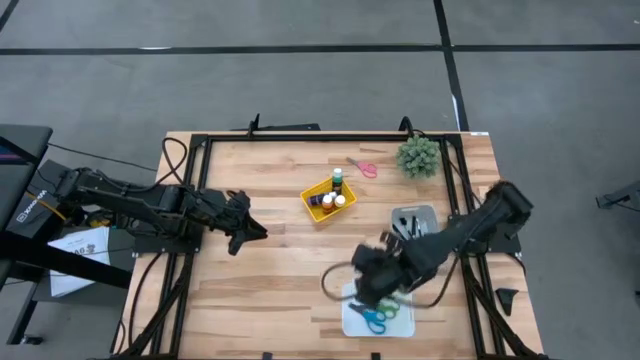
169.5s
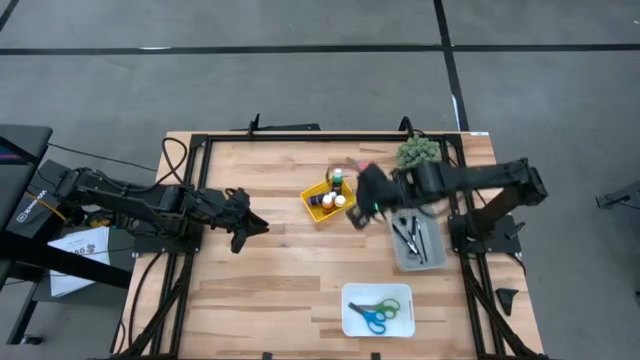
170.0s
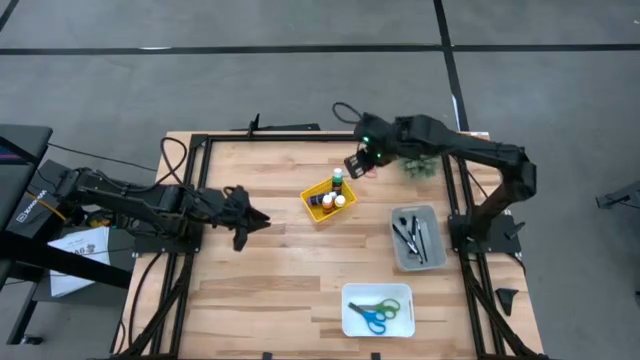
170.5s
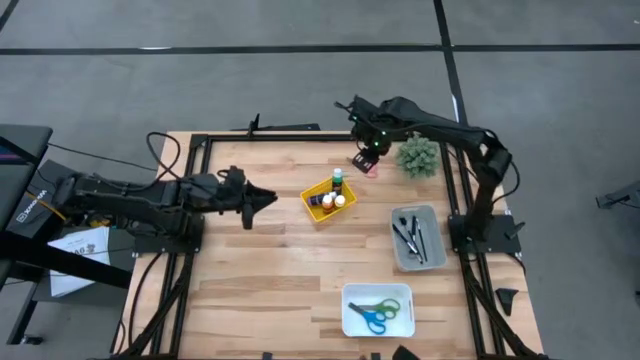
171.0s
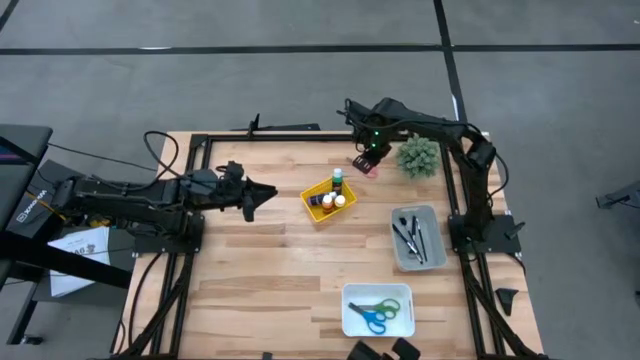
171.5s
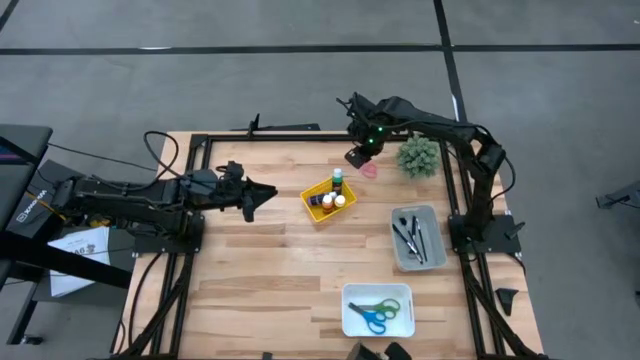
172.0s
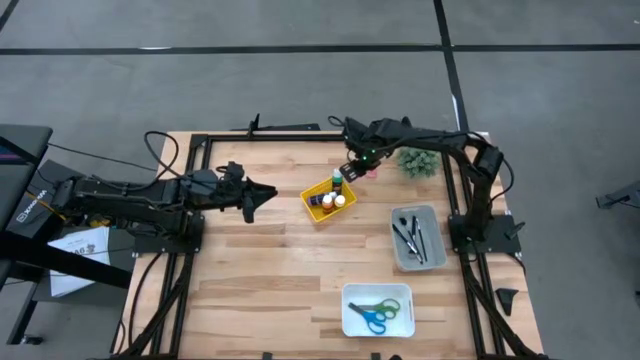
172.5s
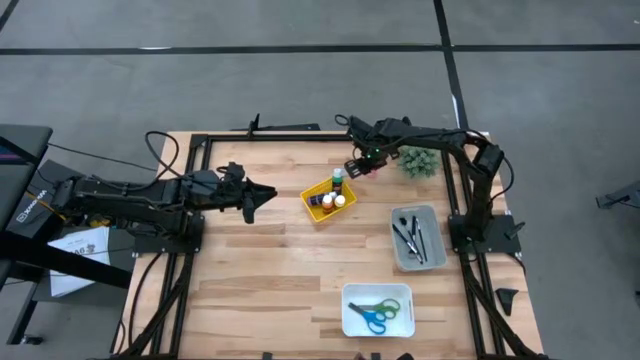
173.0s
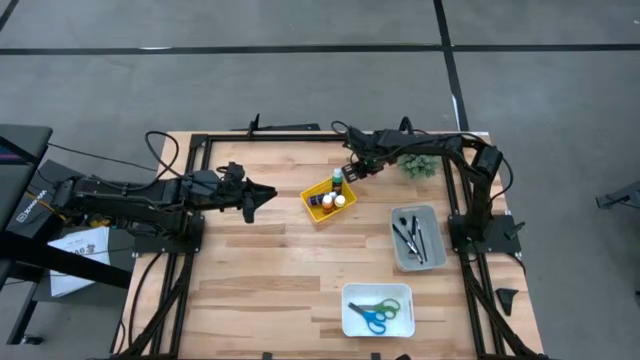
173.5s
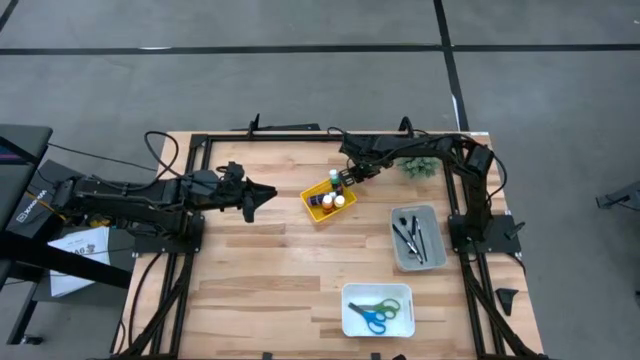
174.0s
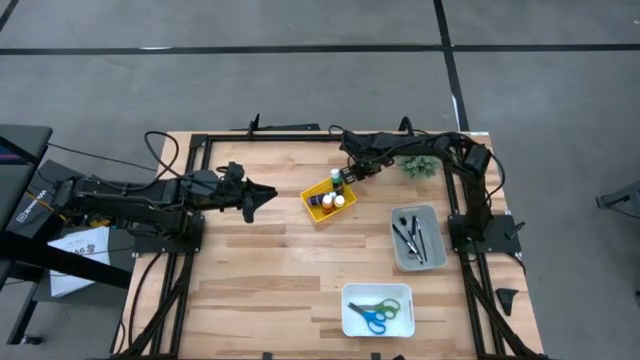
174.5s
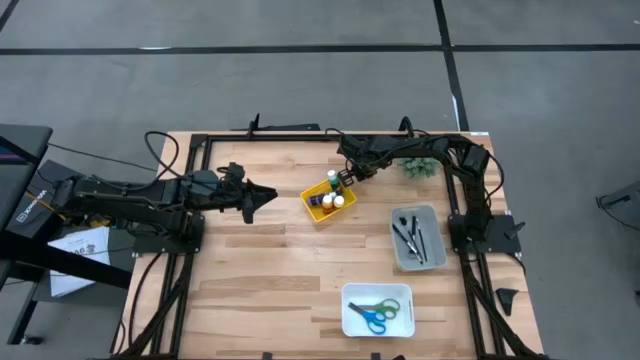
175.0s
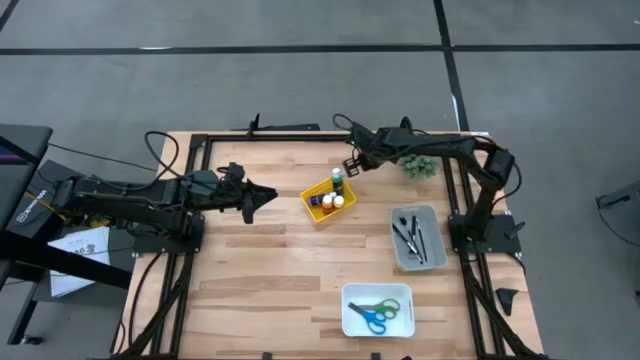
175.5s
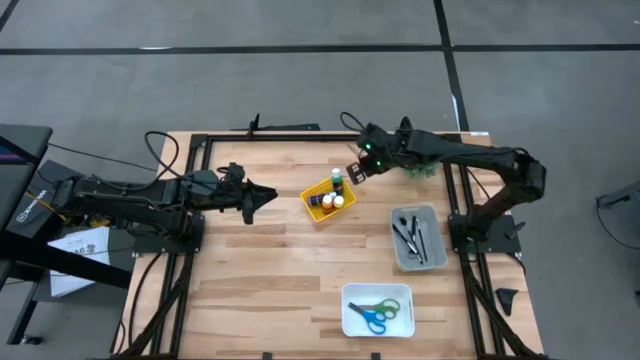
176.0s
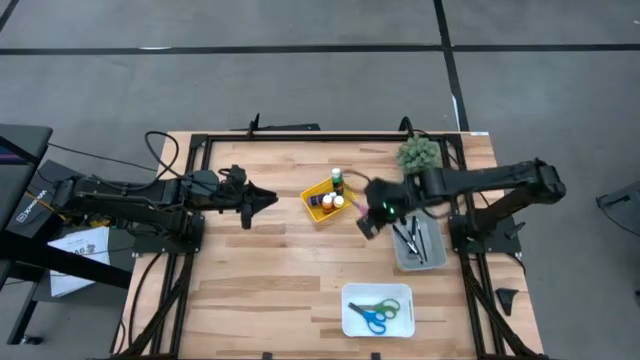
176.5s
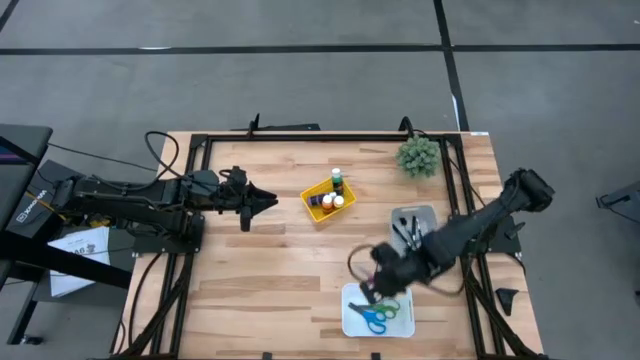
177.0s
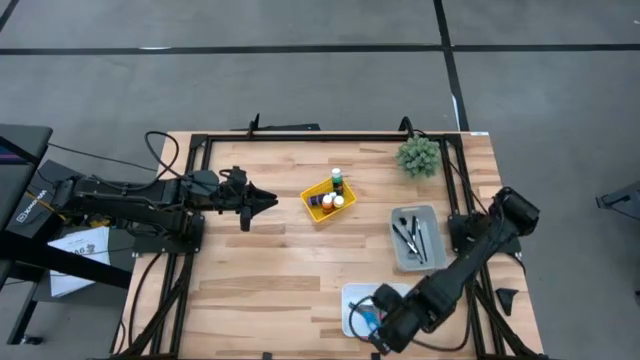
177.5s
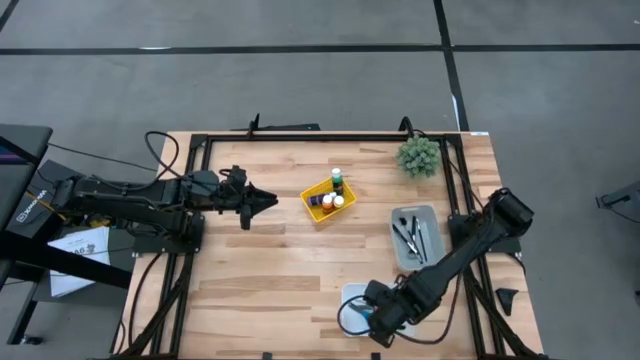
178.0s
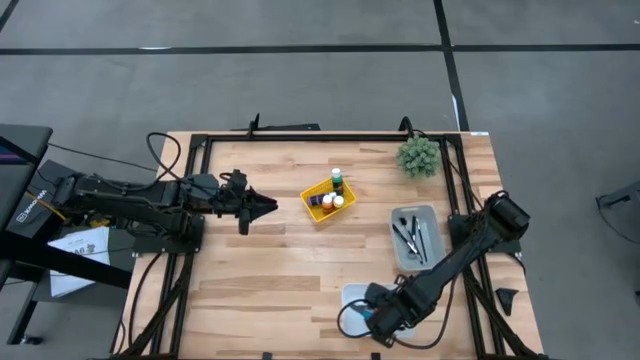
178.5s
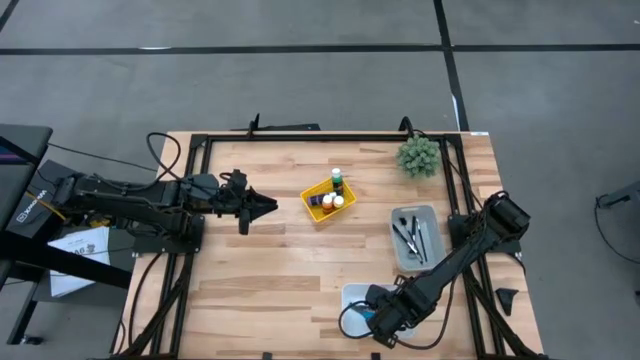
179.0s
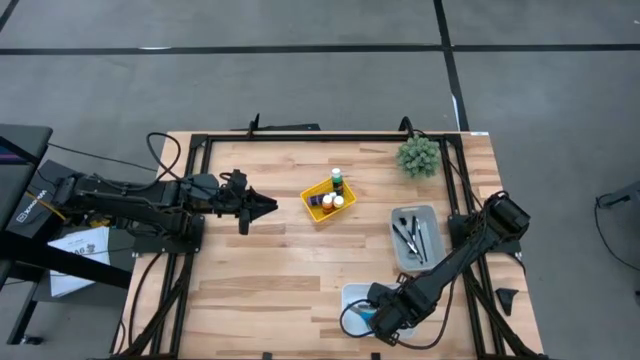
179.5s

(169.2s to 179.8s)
Task: Pick & Place Paint Supplies
Put the pink scissors into the white bin

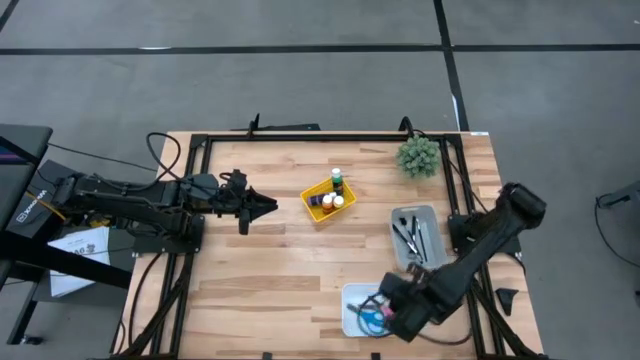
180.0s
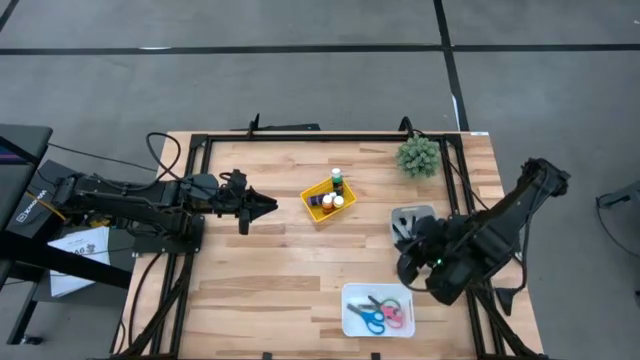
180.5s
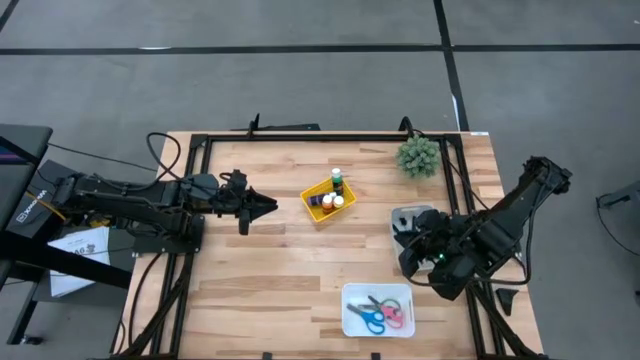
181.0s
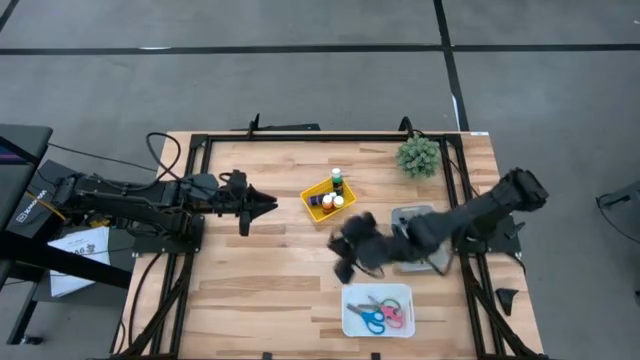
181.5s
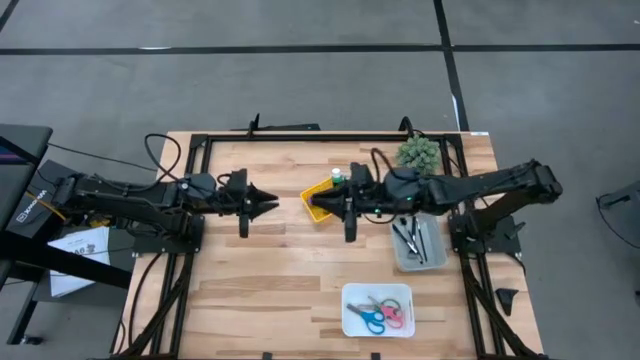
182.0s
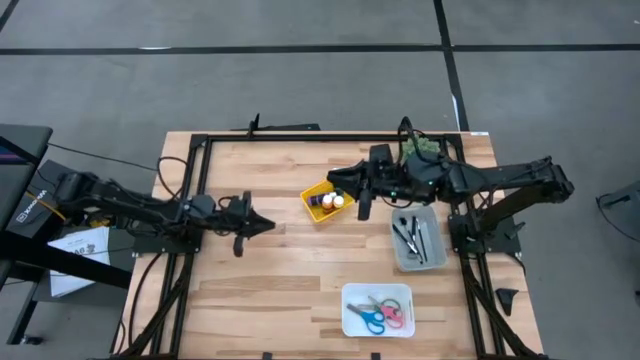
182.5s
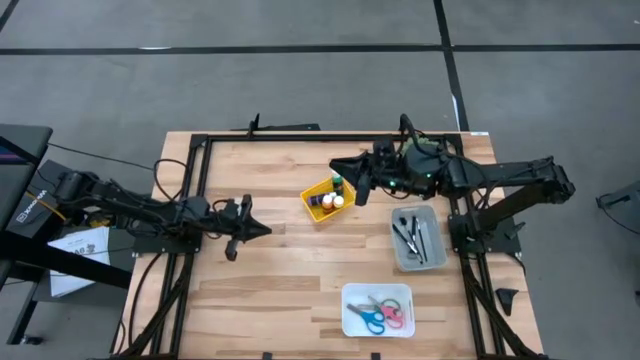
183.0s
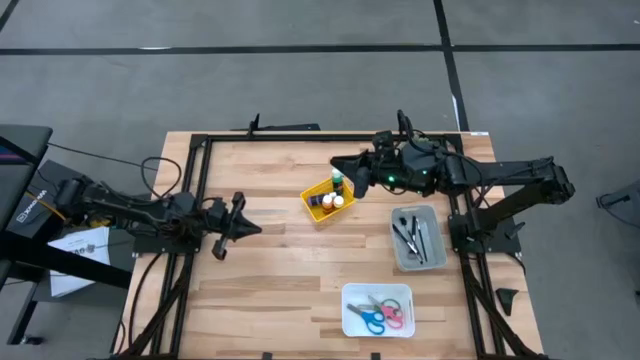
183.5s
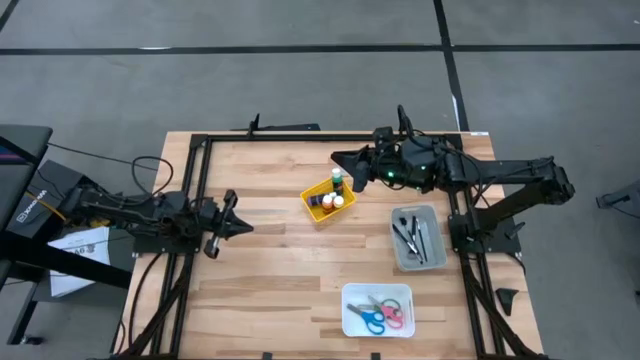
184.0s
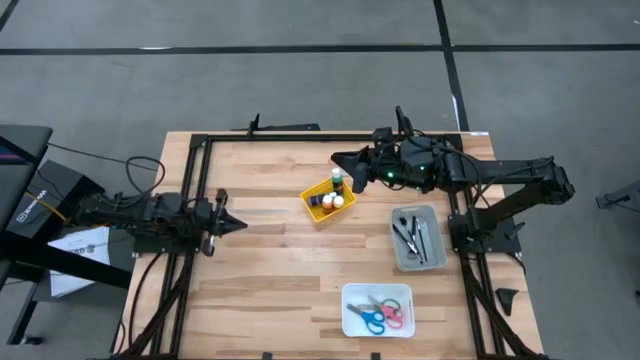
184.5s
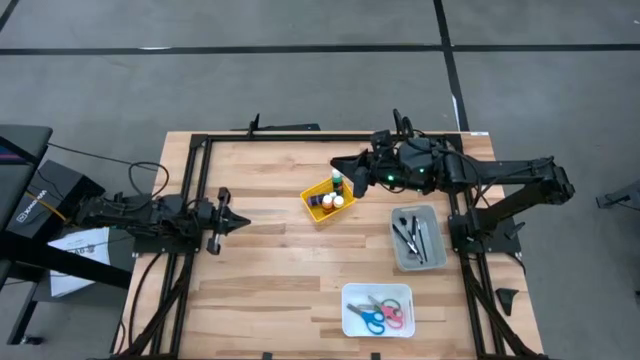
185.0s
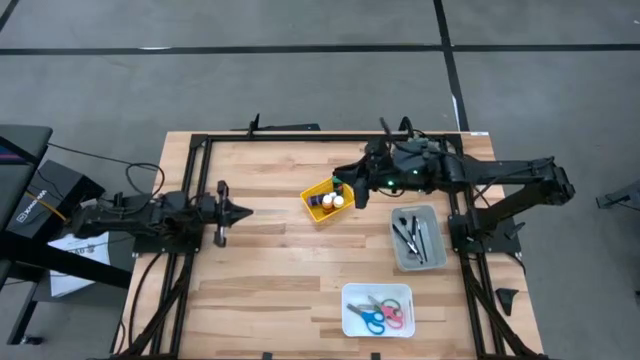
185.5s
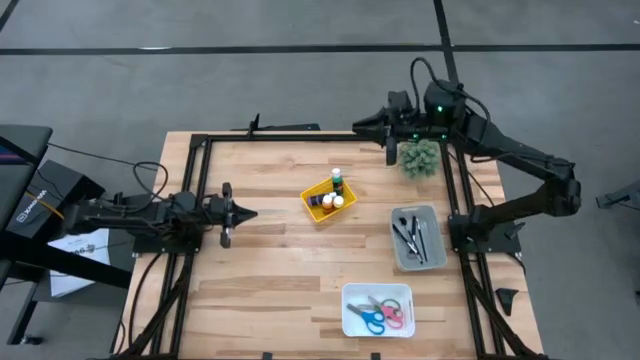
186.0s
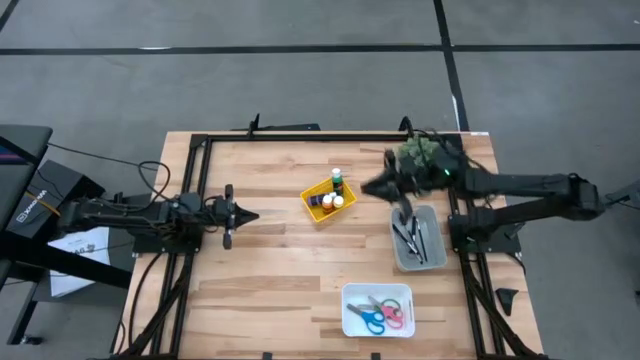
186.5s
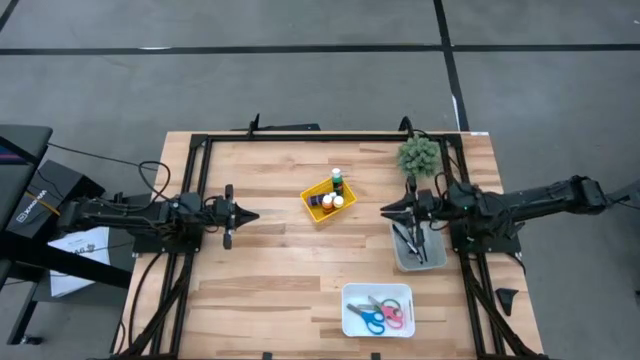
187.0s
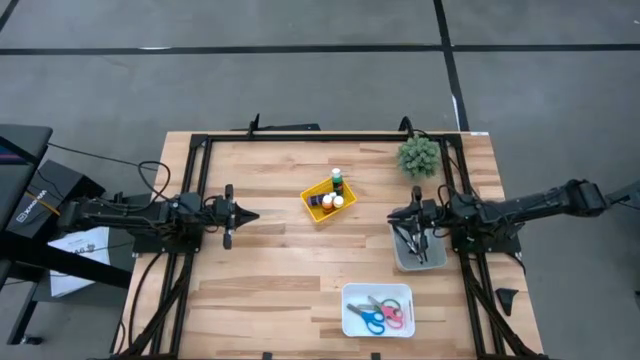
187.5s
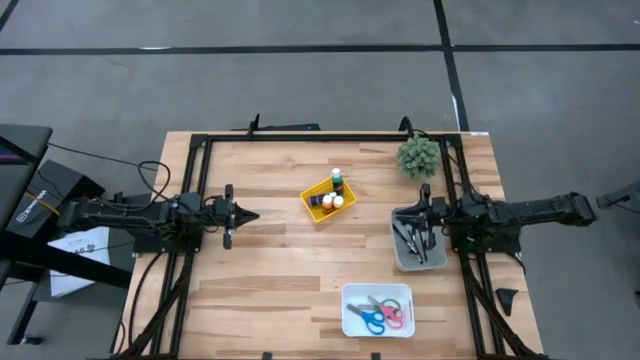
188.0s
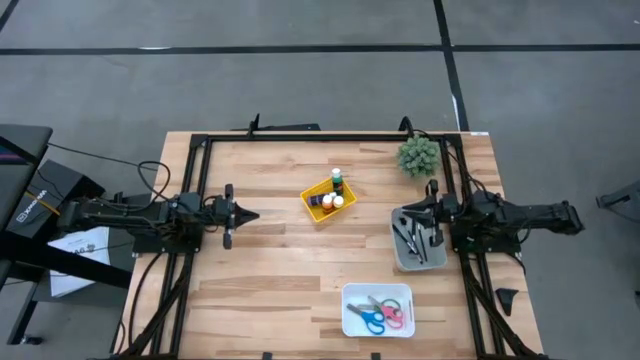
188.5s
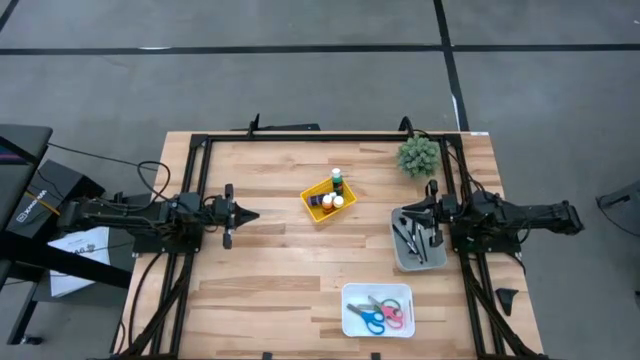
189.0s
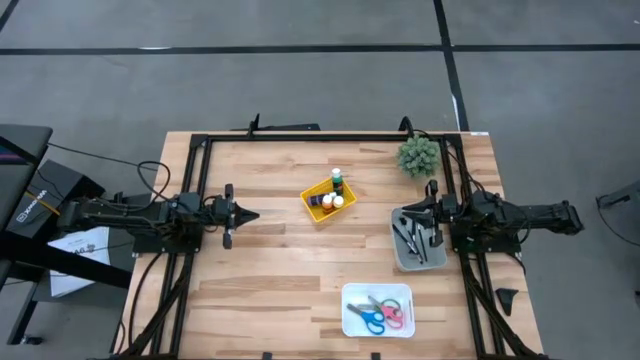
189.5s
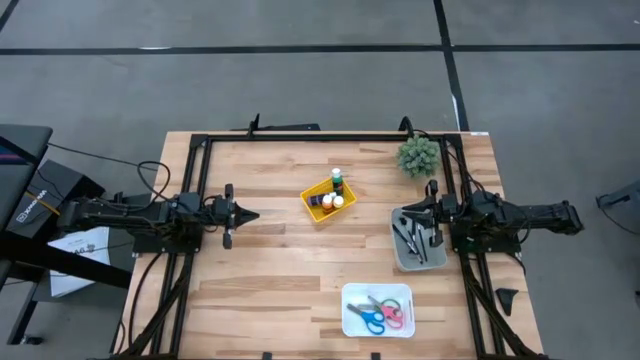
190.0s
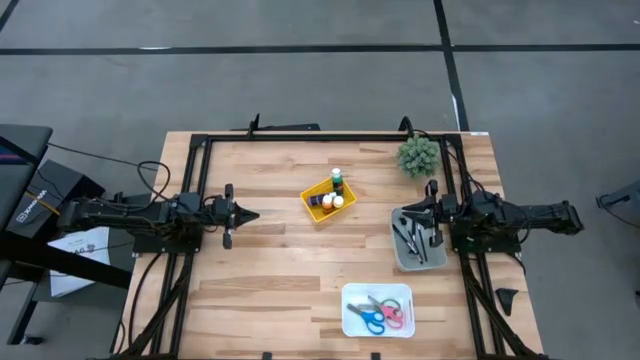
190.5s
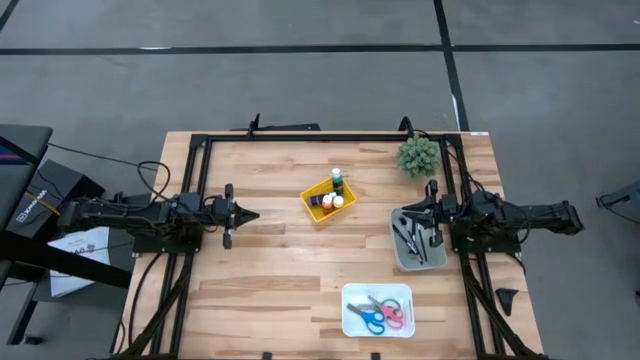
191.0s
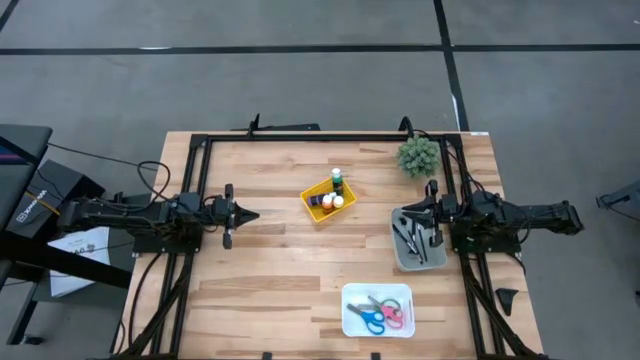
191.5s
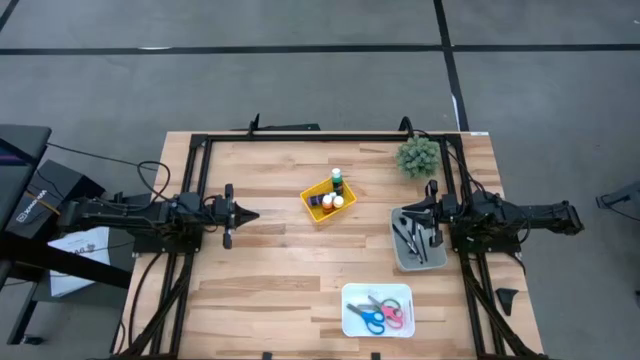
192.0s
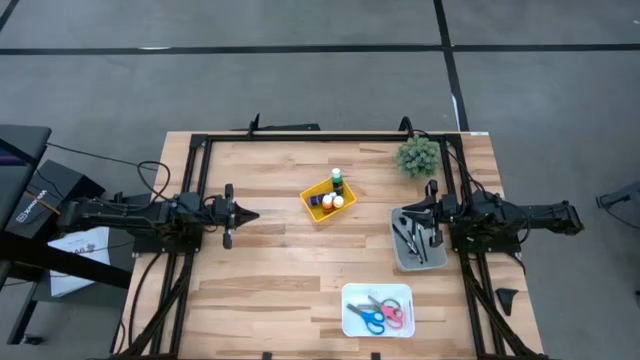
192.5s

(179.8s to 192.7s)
Return to Home Position
